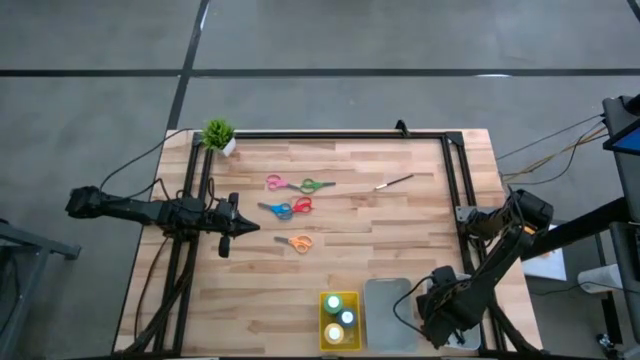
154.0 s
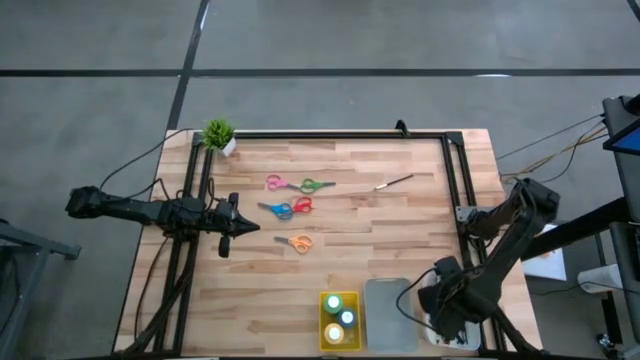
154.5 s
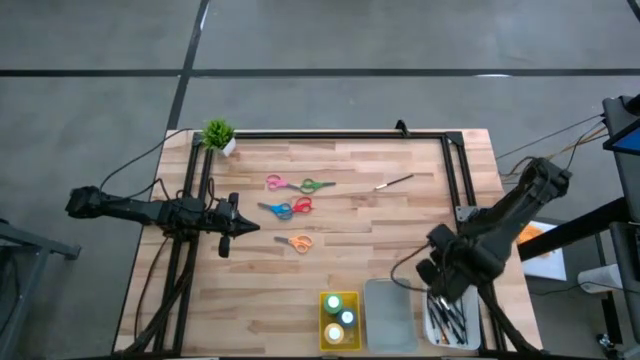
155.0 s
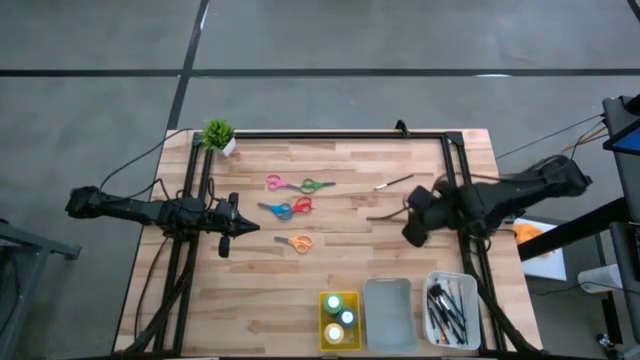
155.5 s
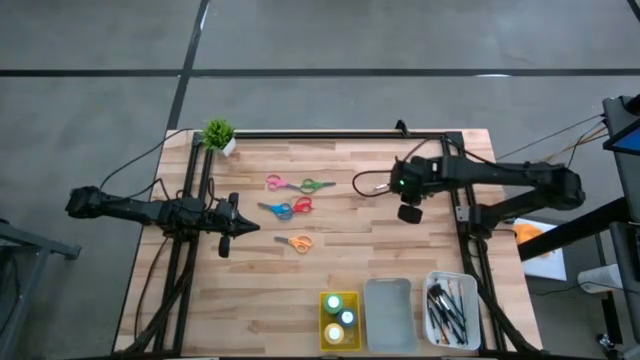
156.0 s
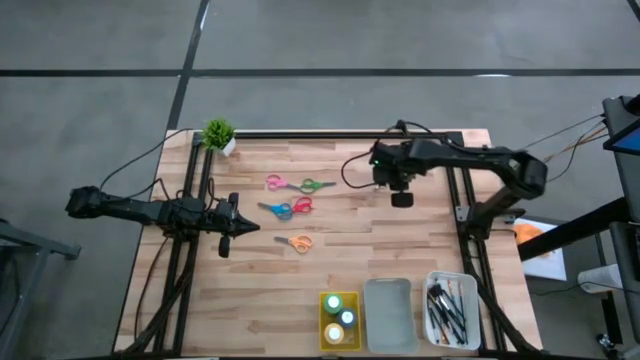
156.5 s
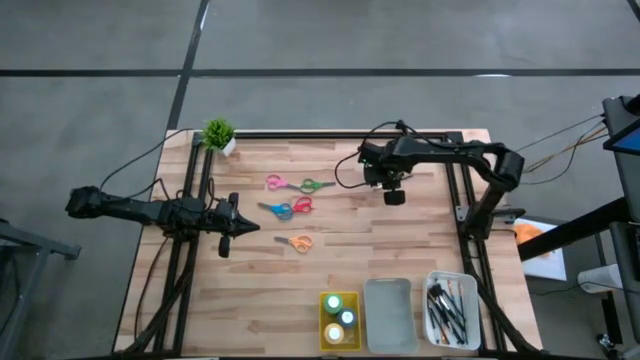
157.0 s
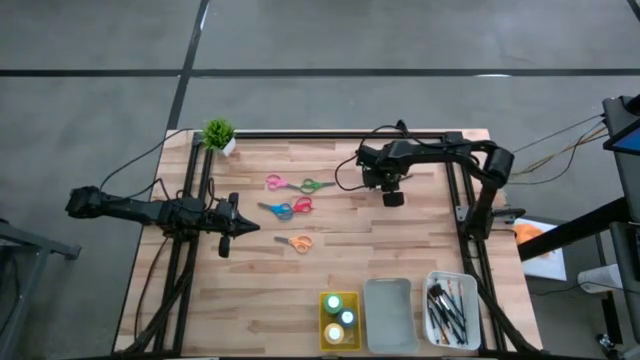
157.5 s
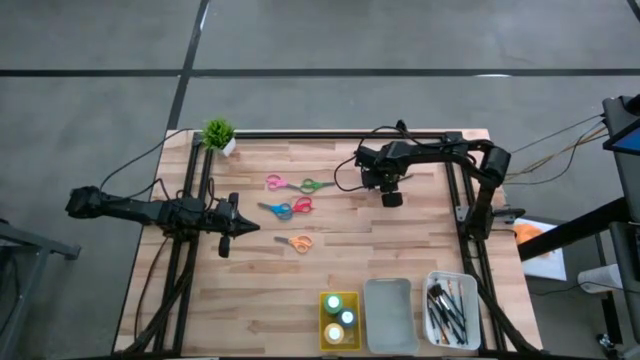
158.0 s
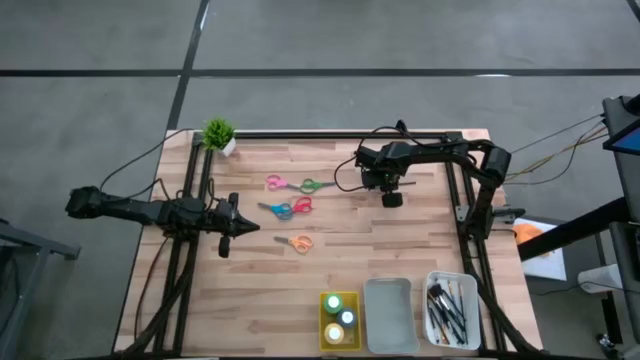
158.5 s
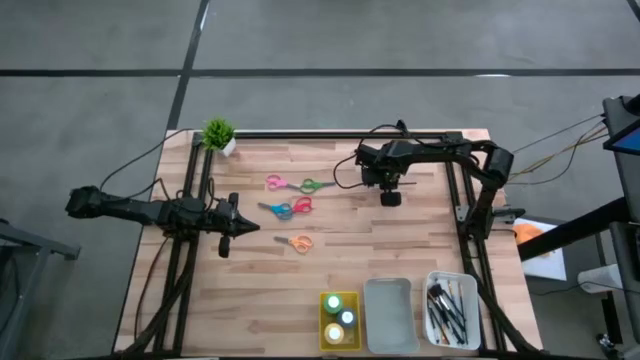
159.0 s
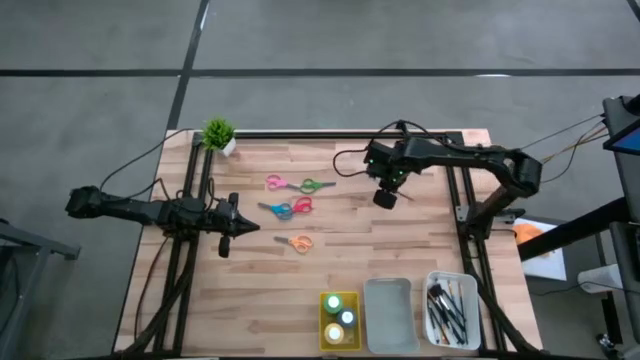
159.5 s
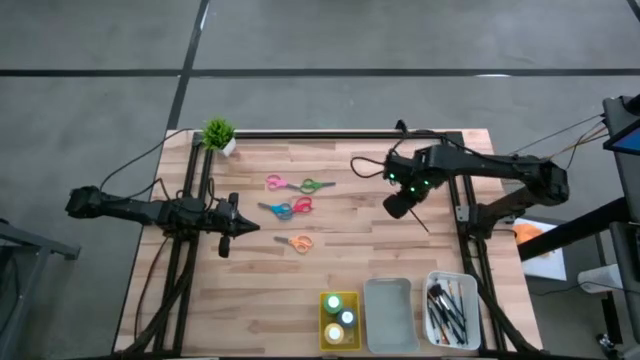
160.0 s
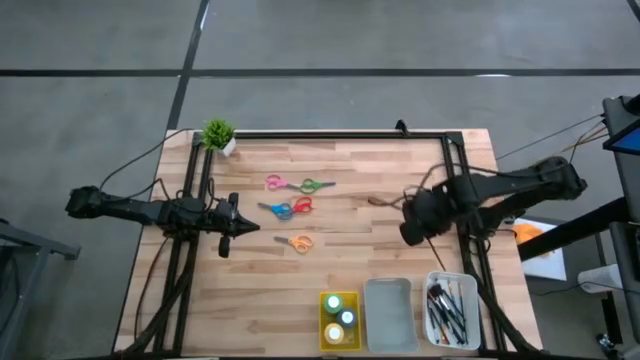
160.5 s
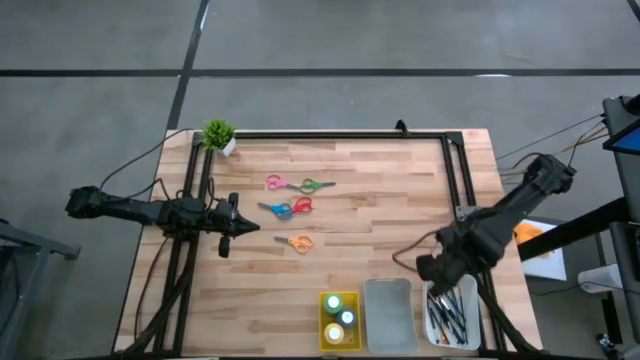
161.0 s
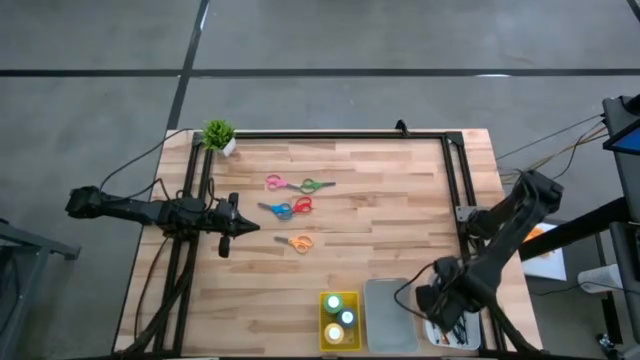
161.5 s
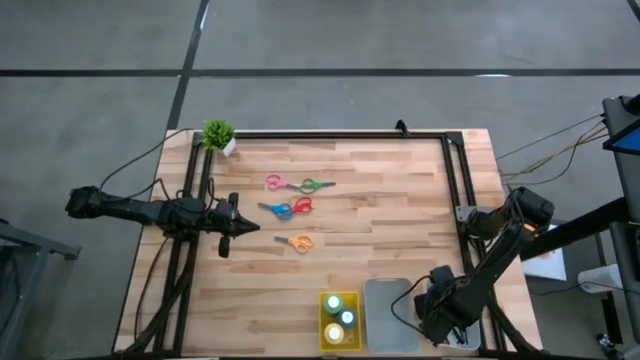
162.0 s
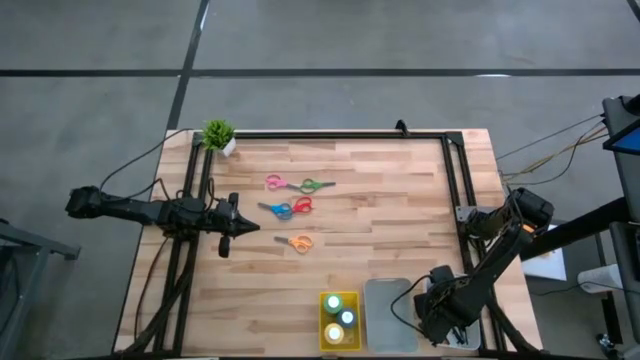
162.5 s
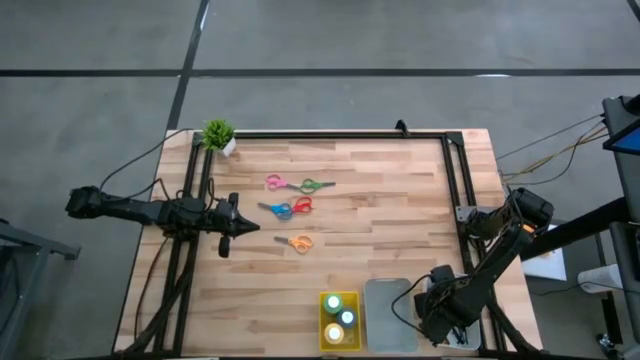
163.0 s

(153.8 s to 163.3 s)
Task: Pick & Place Paint Supplies
Put the silver brush into the white bin

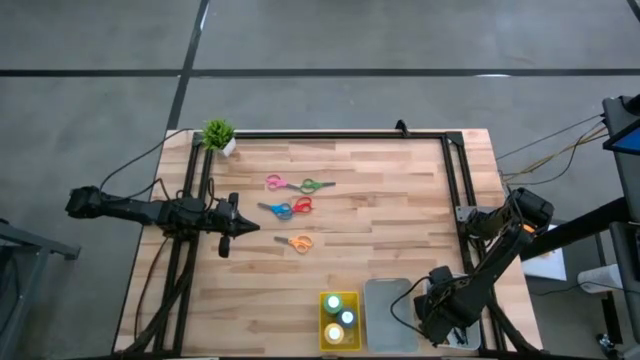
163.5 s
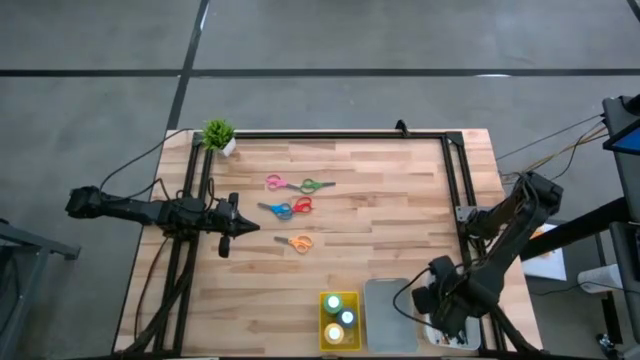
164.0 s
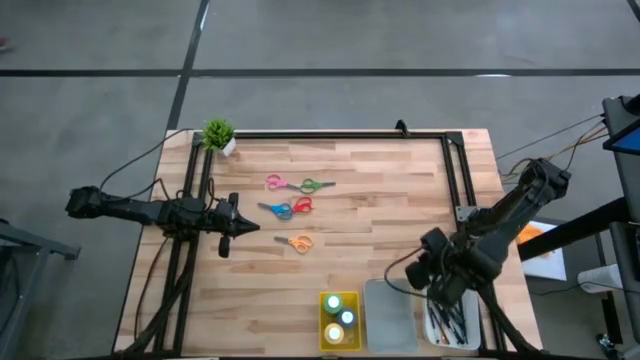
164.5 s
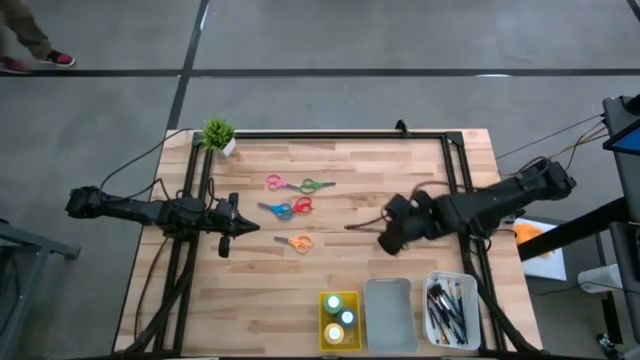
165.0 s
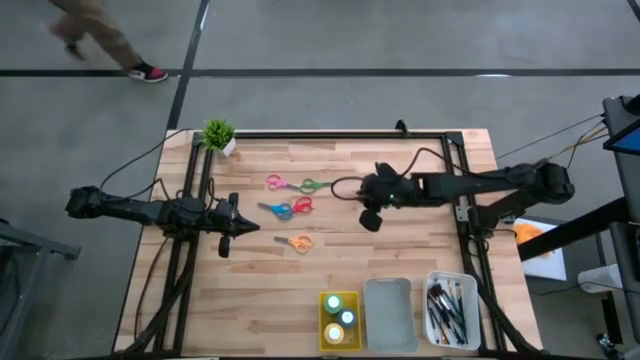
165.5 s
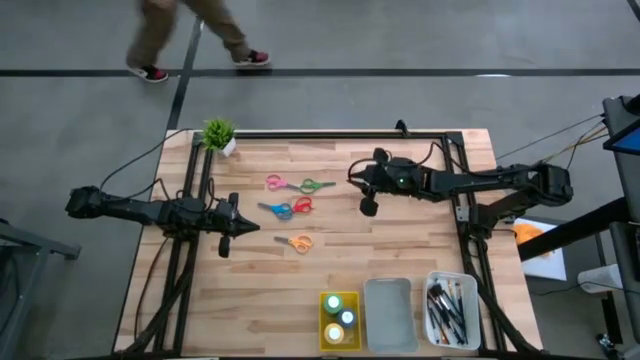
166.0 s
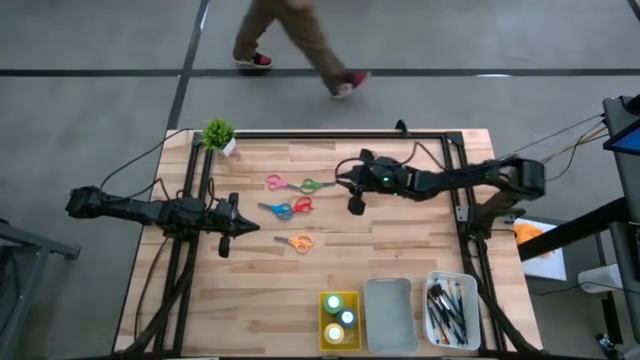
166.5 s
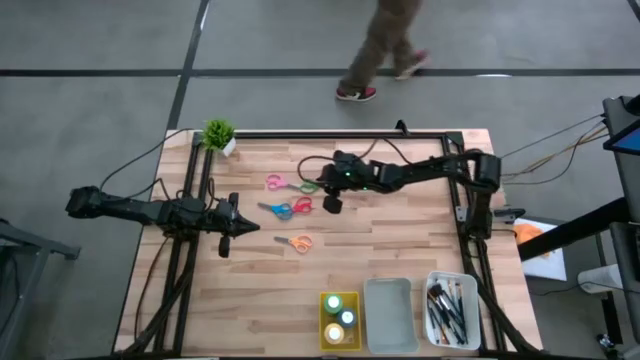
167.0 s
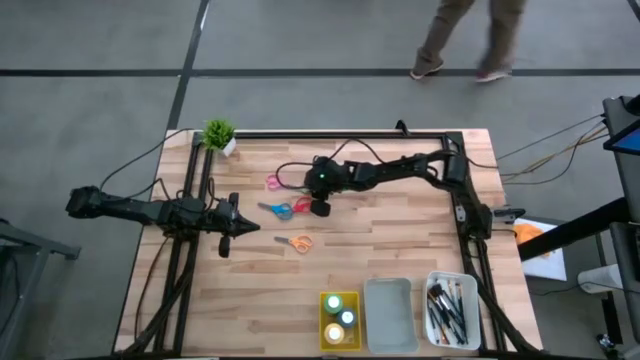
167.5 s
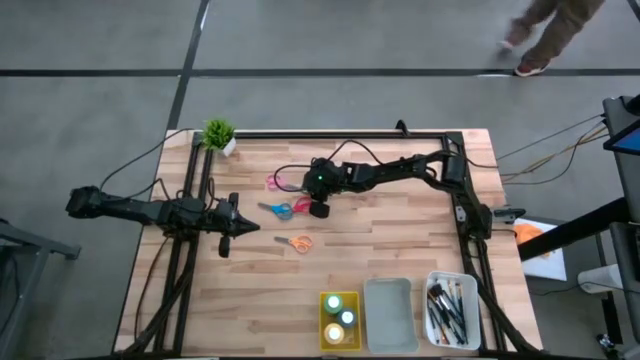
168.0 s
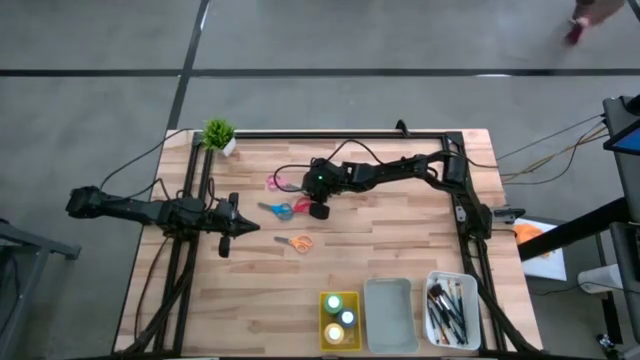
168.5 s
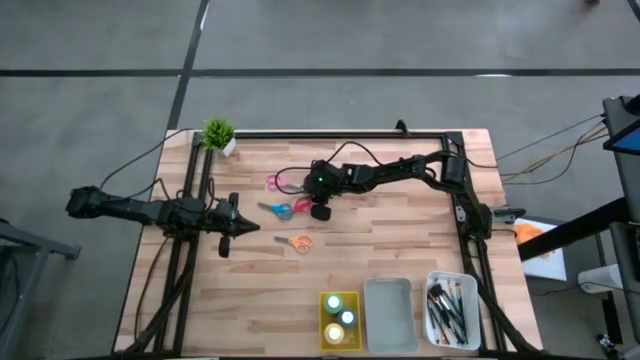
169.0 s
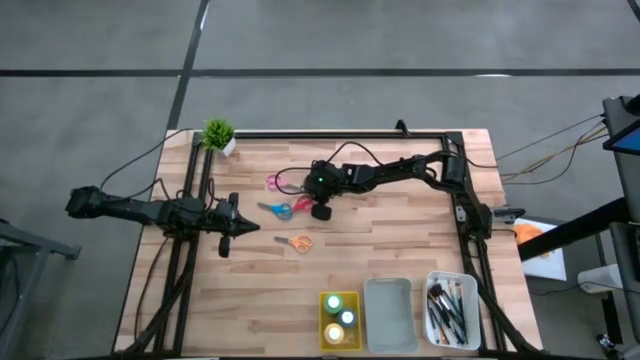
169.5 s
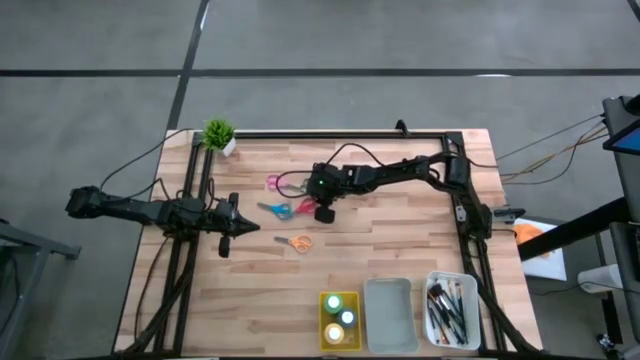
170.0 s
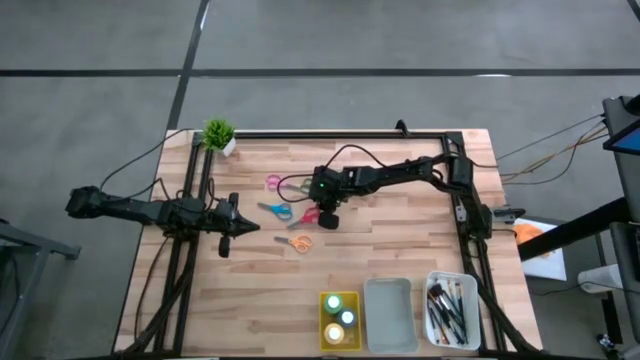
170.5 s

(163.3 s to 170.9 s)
Put the red scissors into the gray bin

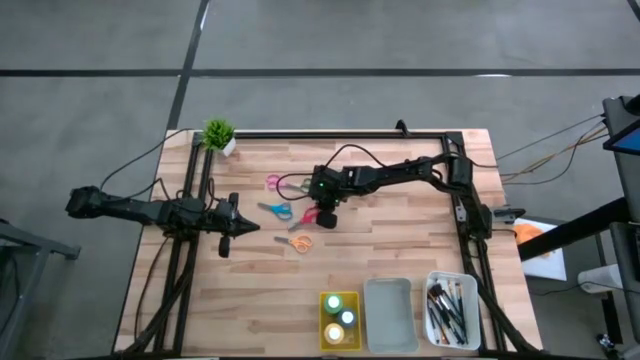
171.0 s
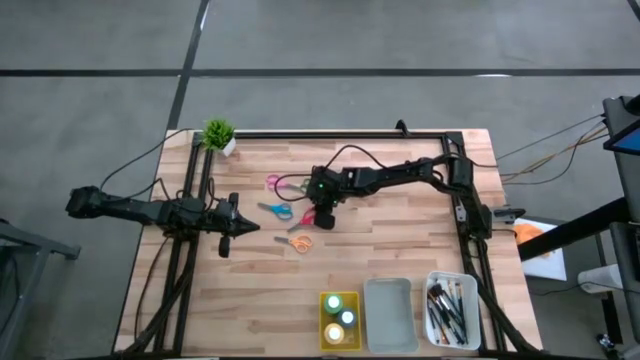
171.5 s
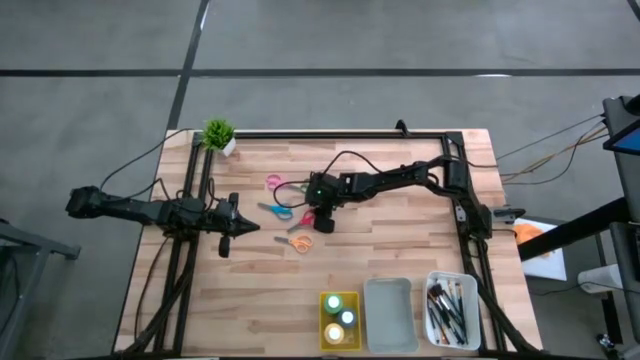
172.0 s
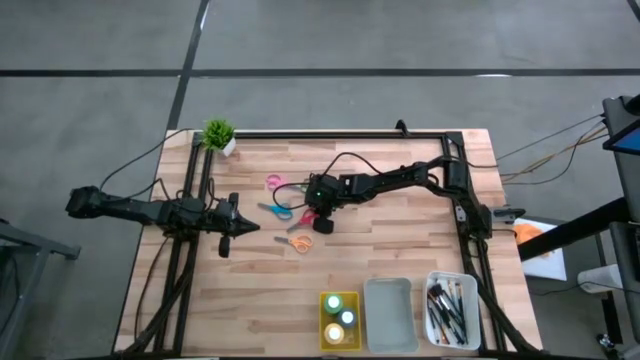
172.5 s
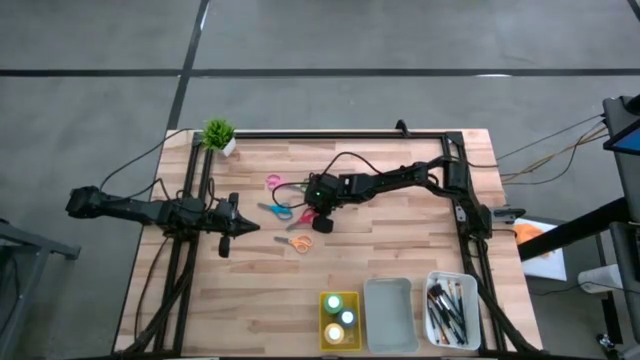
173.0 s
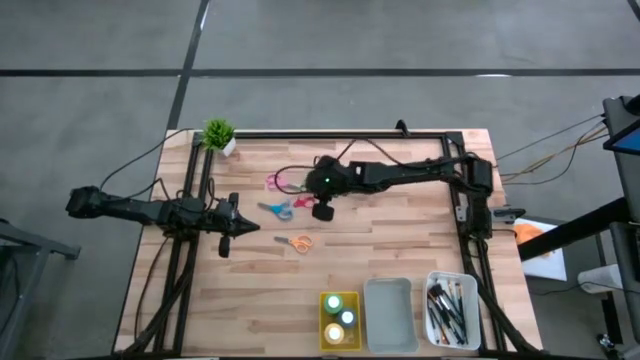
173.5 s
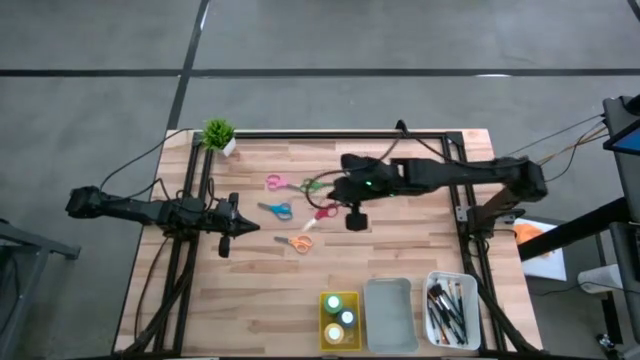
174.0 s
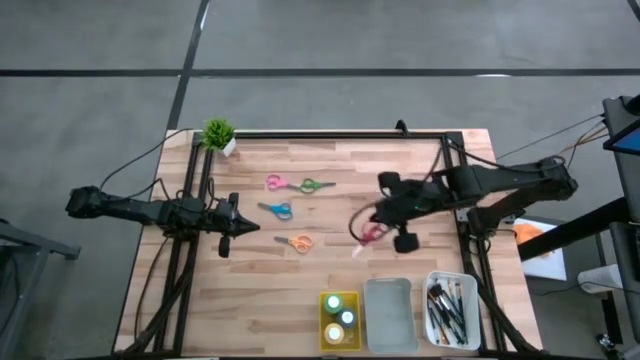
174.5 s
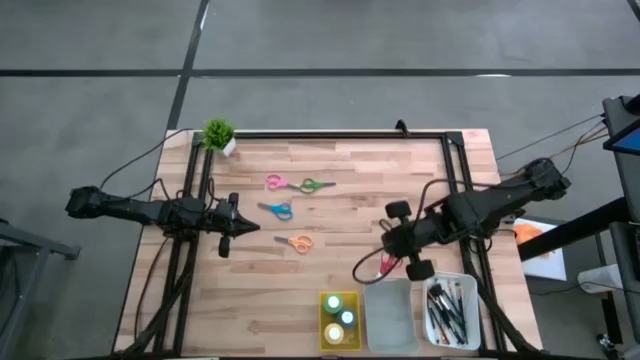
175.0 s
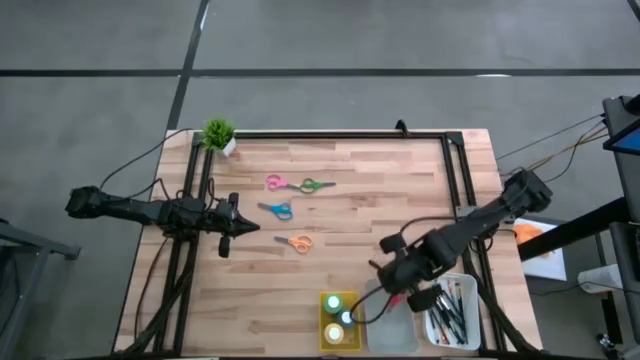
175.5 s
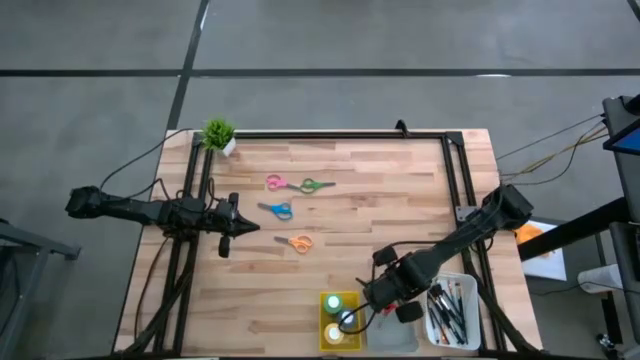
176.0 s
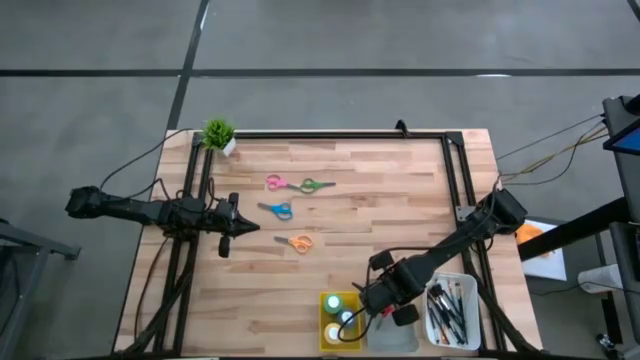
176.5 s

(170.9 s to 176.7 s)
Put the red scissors into the gray bin
